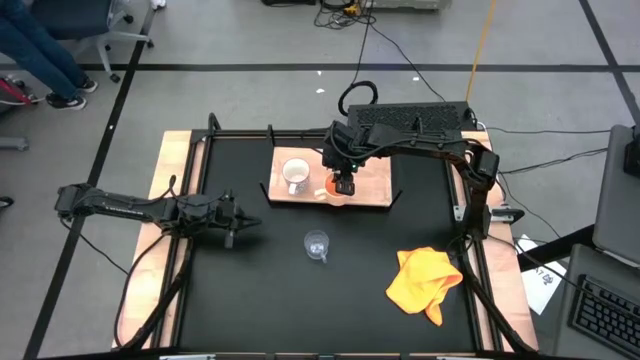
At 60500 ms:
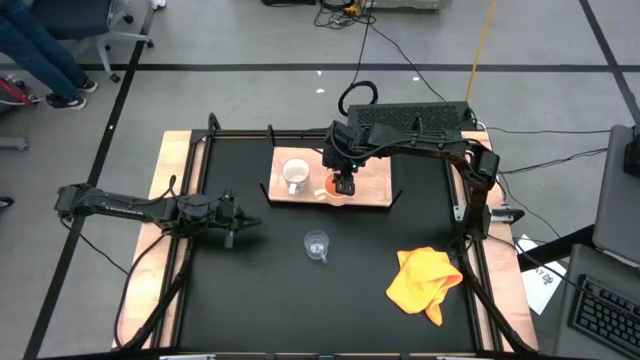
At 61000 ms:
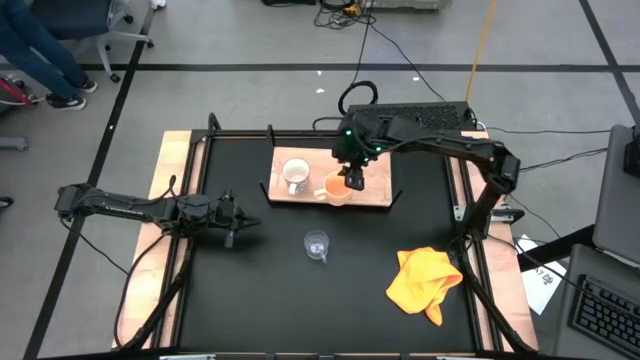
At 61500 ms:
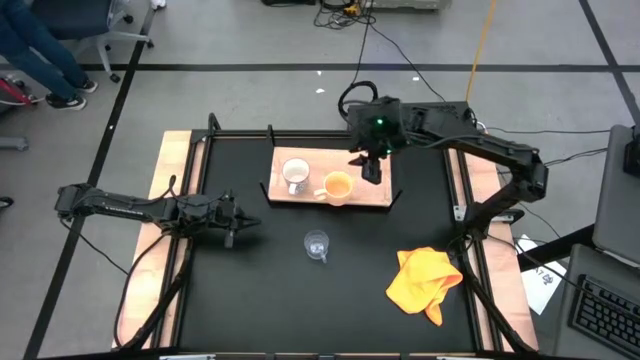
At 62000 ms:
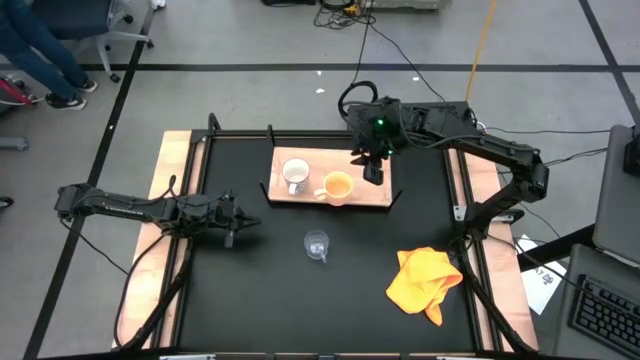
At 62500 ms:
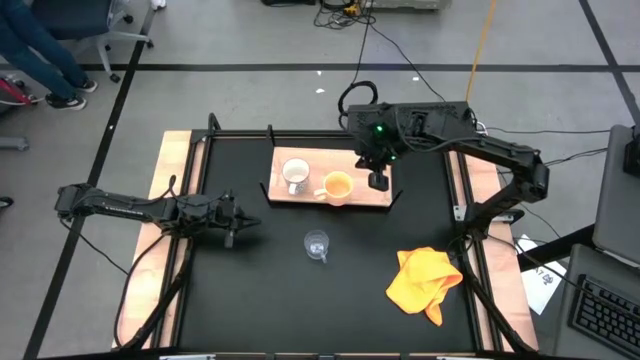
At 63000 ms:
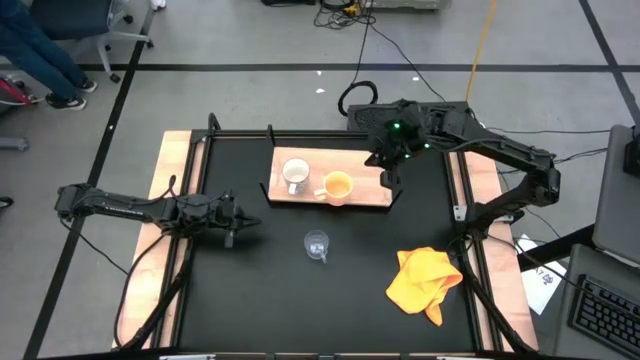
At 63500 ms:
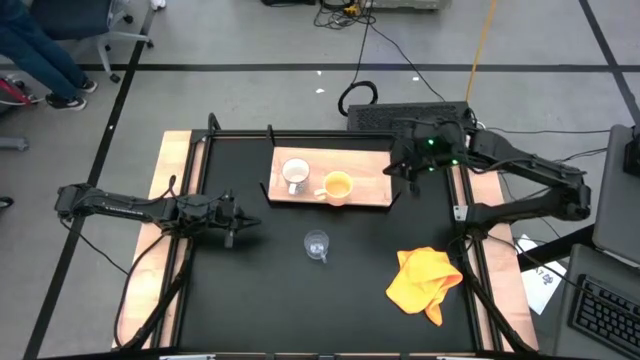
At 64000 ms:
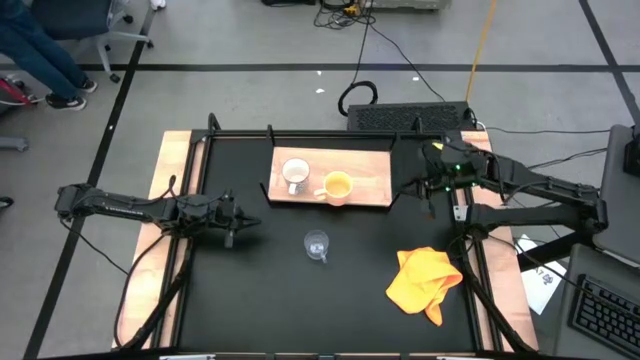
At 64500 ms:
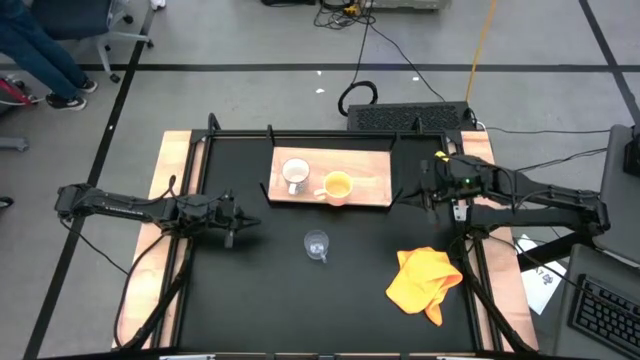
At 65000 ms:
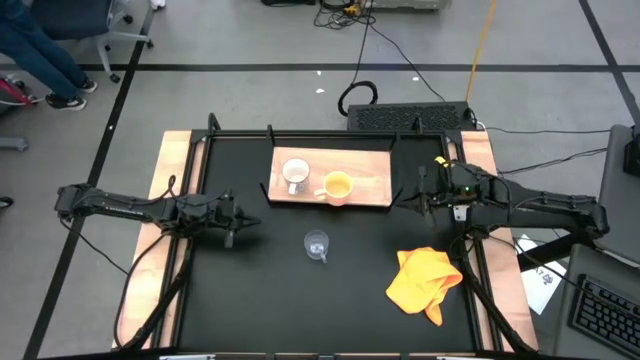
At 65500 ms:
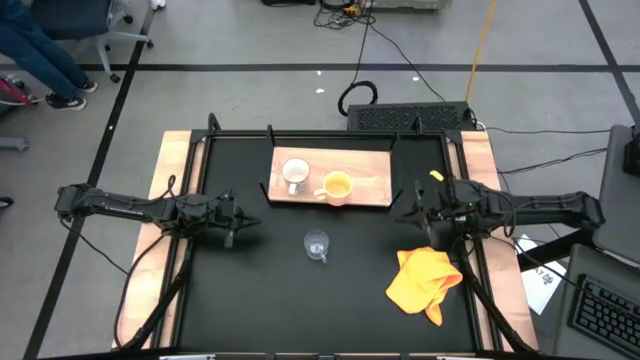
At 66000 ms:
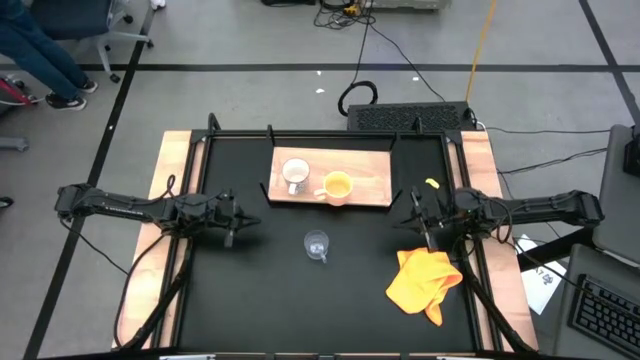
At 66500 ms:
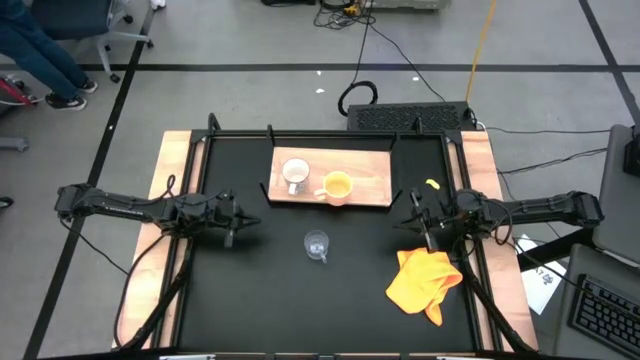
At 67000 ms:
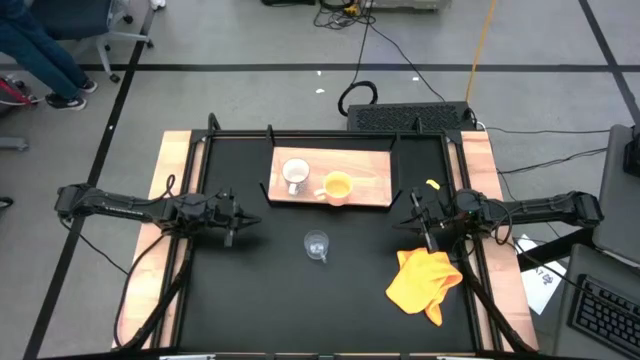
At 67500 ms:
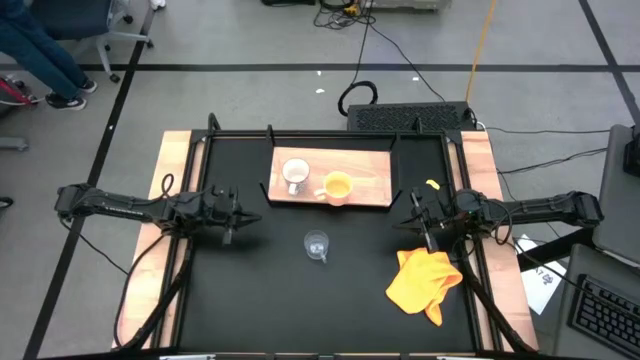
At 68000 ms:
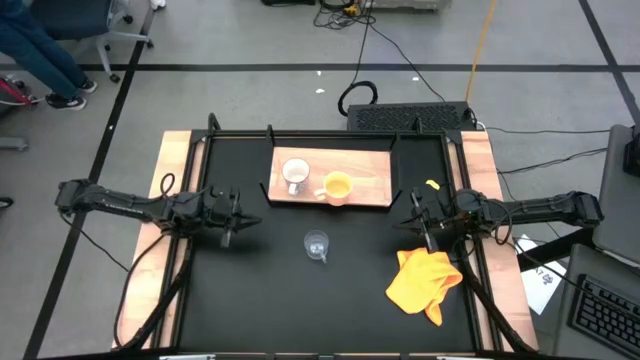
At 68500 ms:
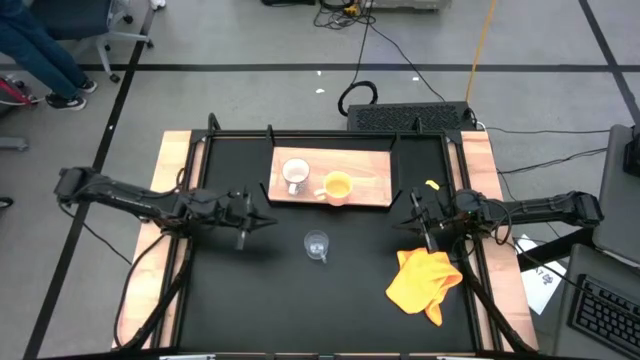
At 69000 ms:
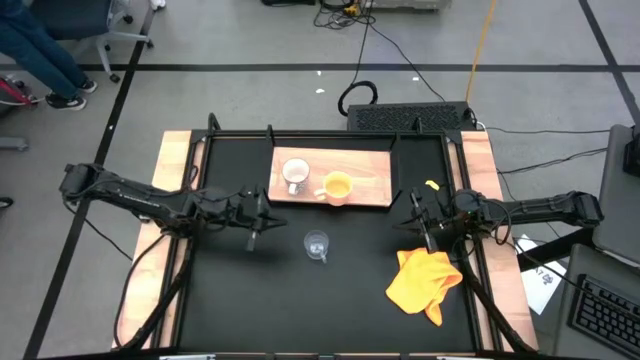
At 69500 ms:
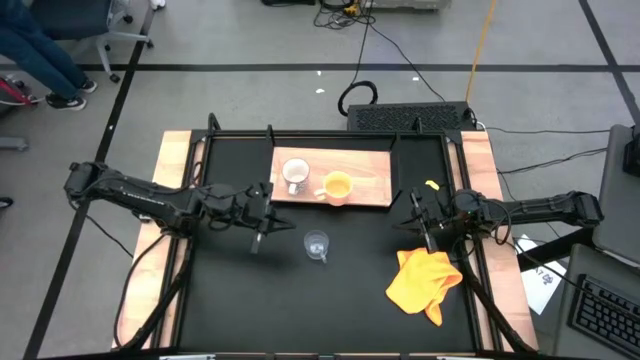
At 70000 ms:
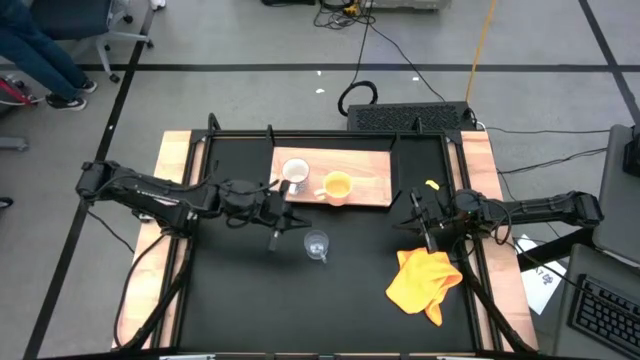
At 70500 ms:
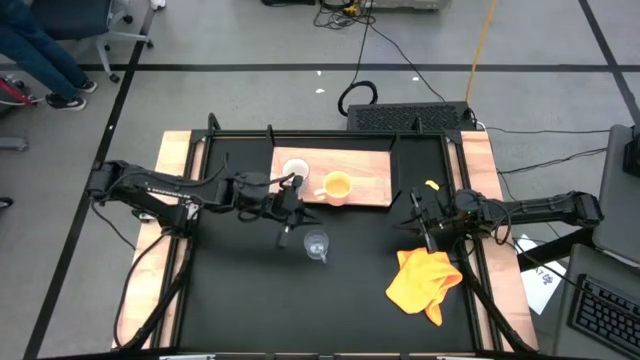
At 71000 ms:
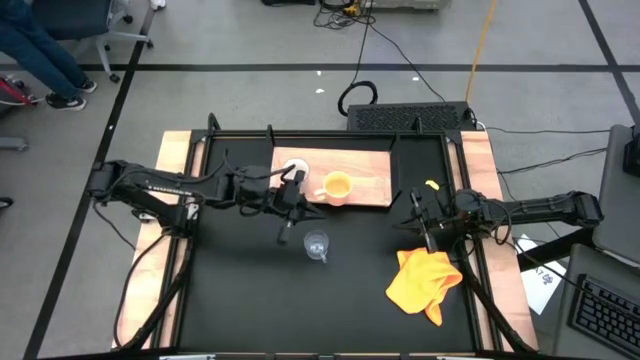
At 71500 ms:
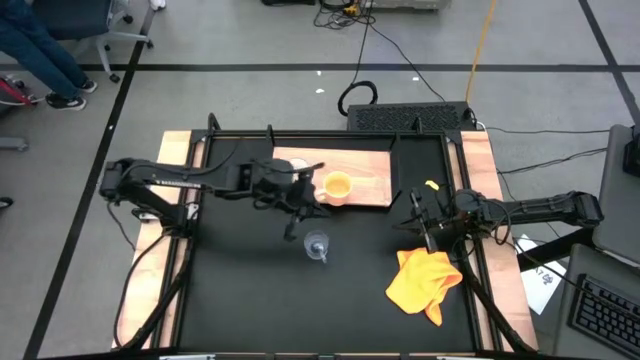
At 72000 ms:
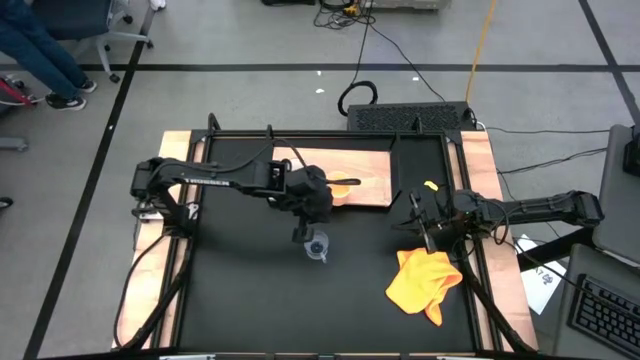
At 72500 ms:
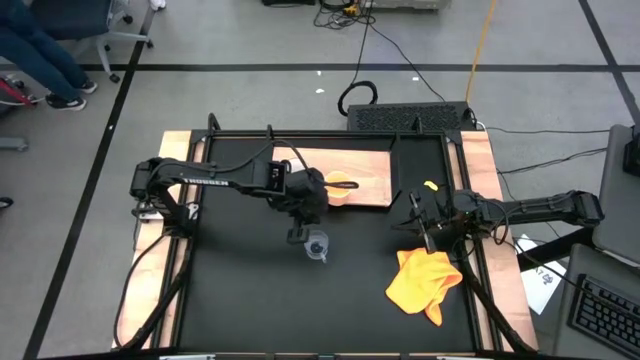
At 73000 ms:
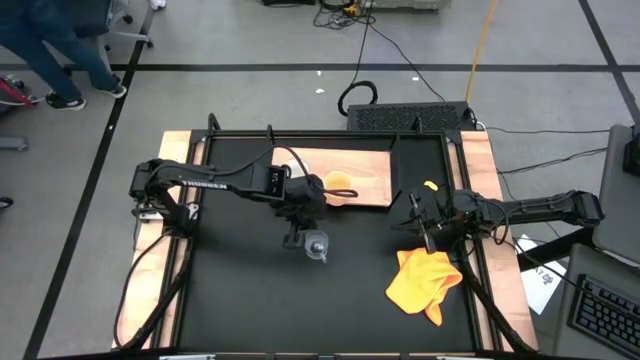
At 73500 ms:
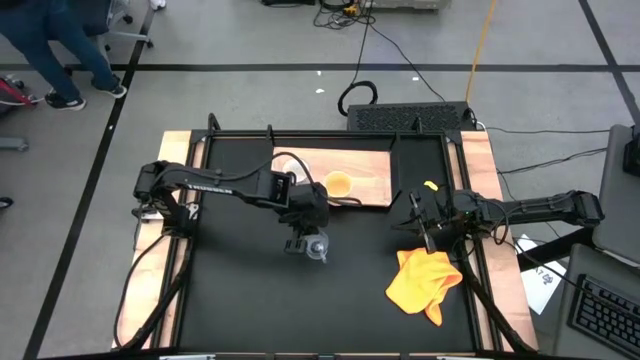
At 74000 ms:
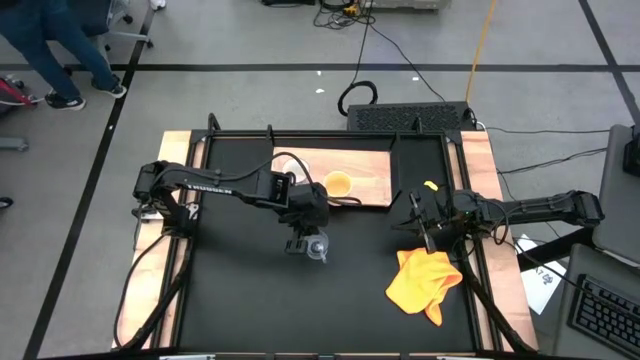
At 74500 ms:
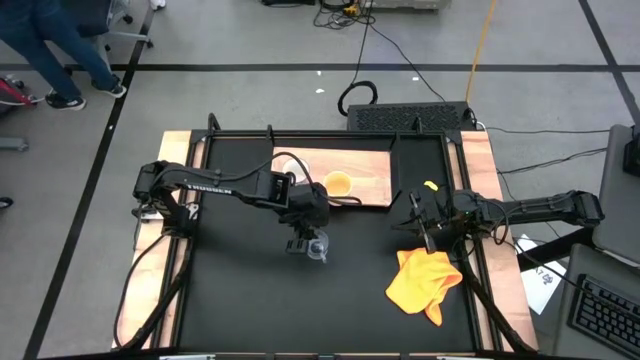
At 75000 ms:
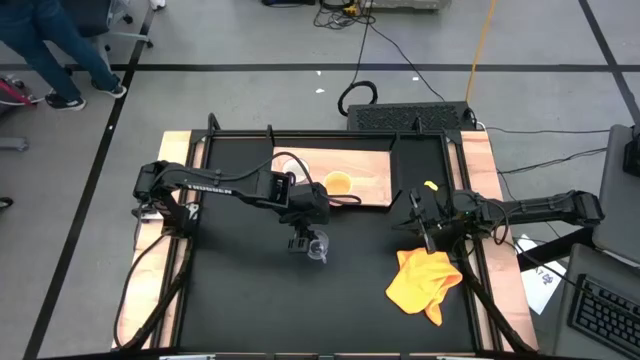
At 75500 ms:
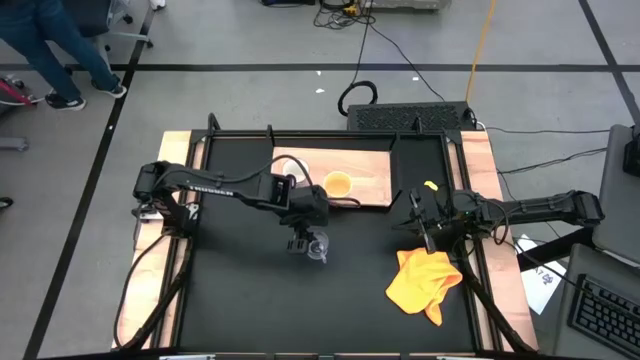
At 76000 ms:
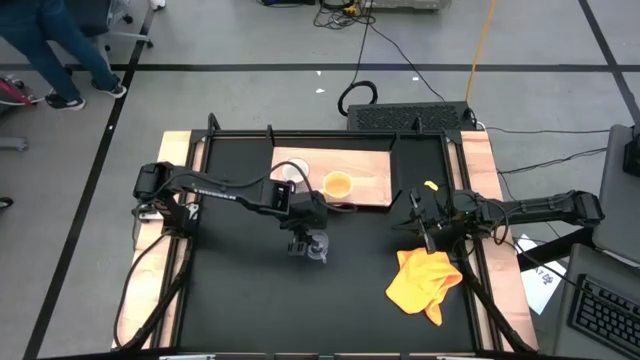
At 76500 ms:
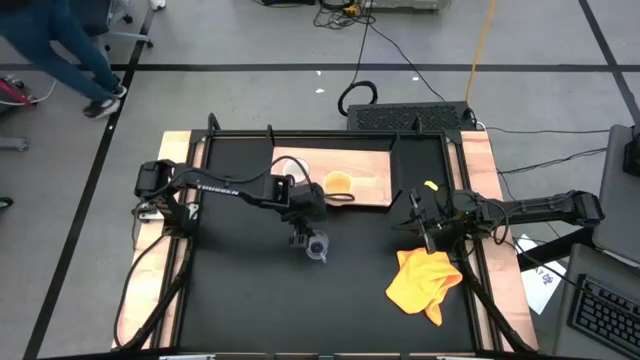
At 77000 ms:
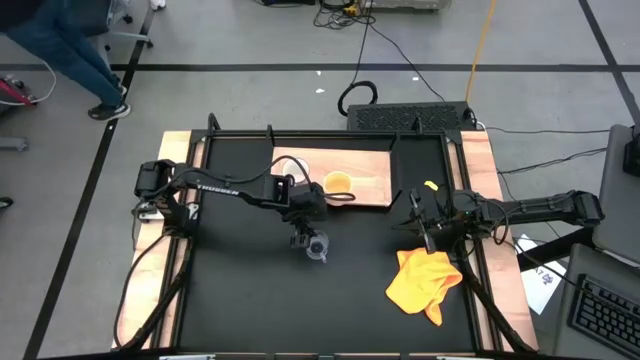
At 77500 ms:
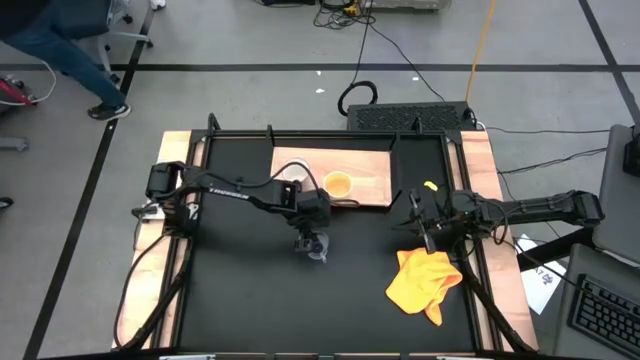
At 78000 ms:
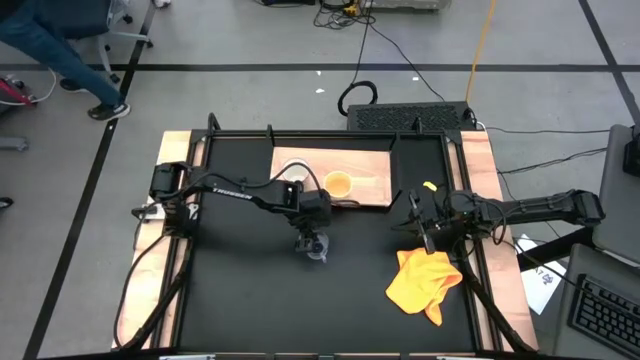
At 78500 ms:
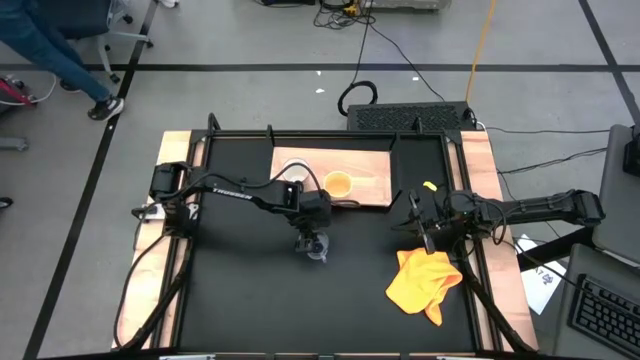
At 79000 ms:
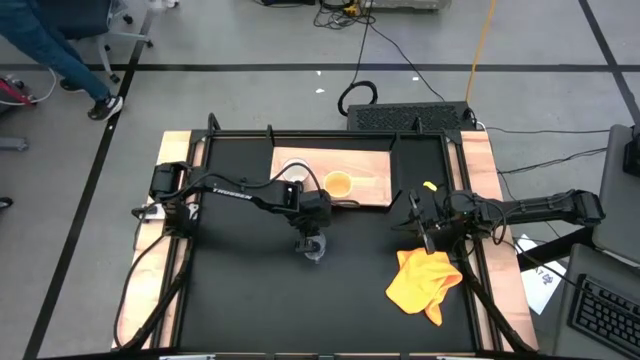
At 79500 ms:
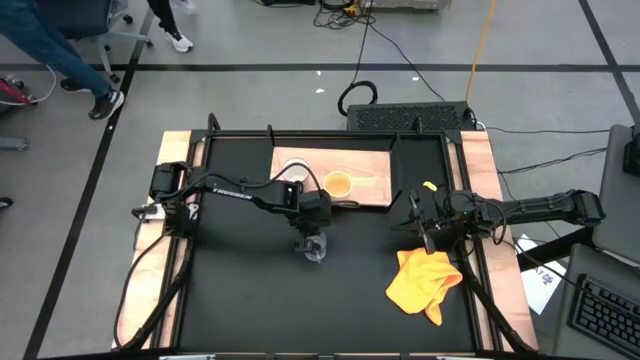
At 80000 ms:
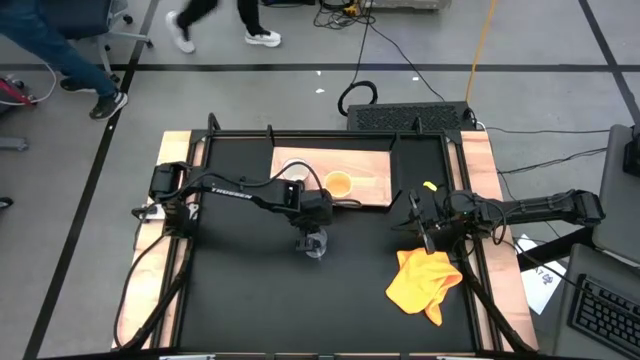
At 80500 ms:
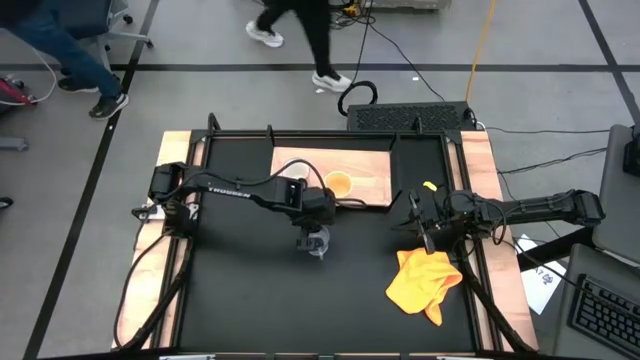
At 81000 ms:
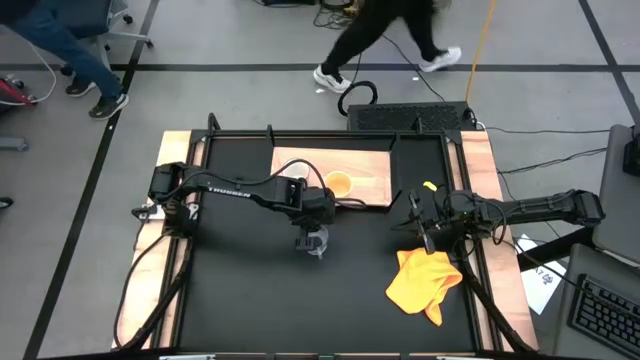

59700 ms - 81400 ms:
Task: Stack small to large cups/mugs on shelf
Put the transparent mug on the shelf
